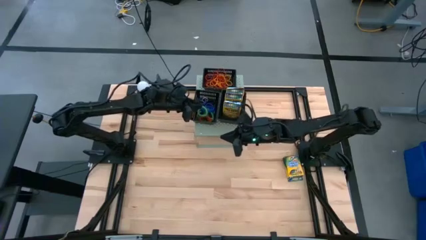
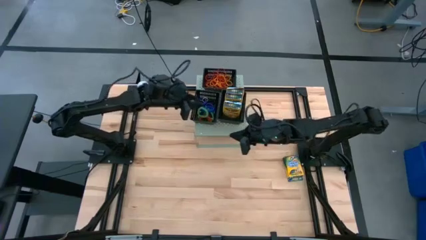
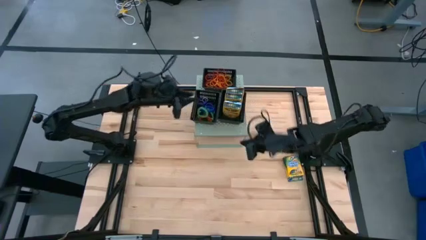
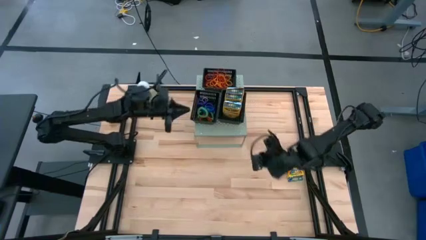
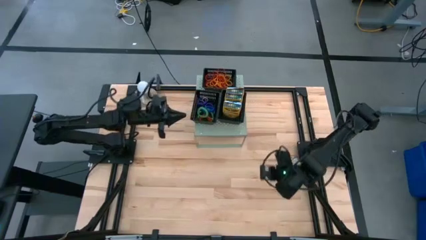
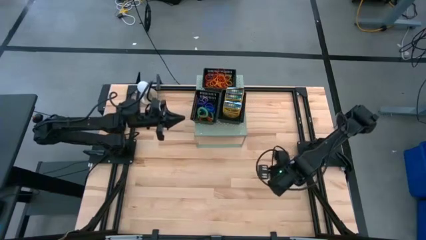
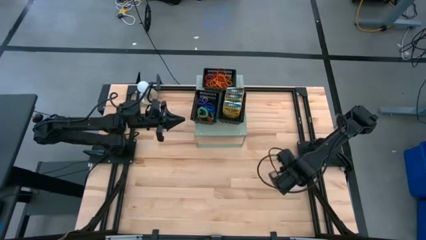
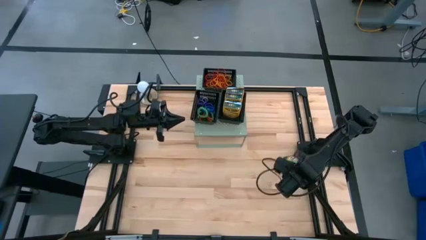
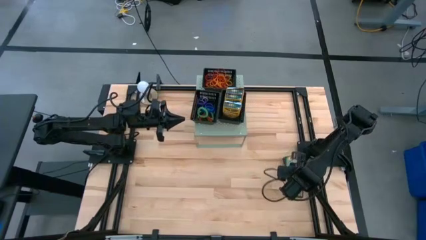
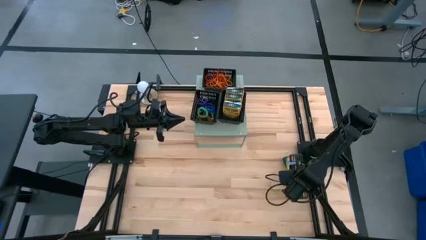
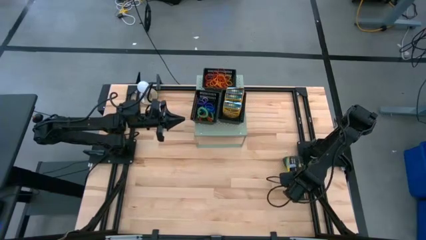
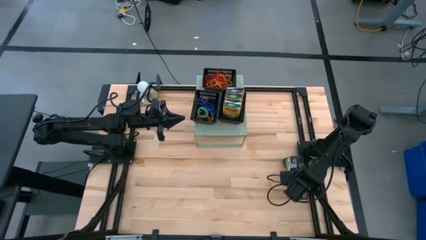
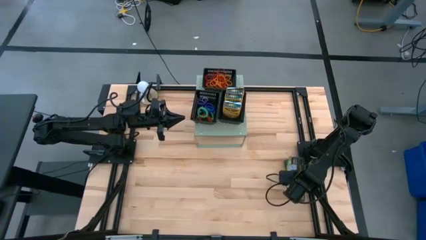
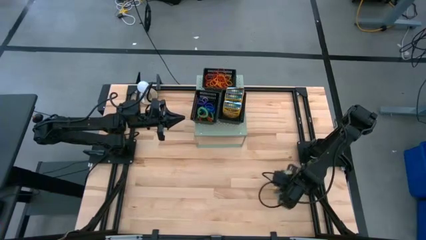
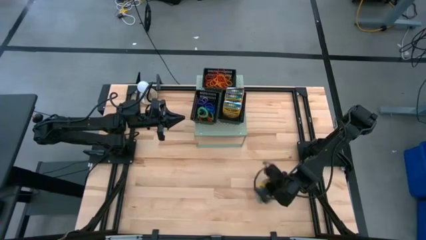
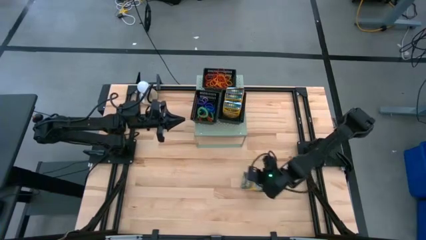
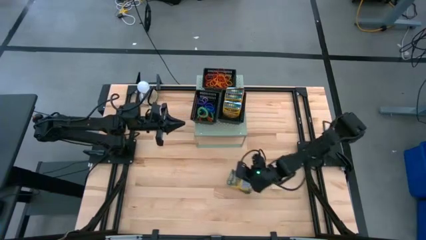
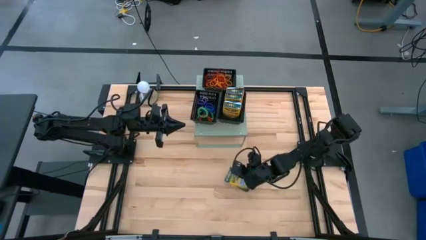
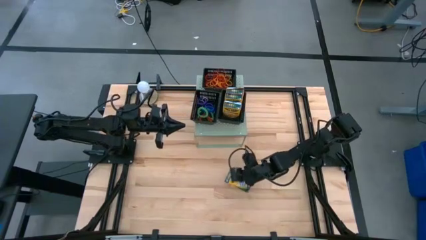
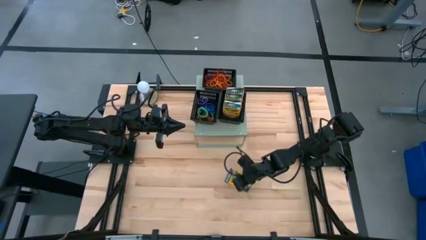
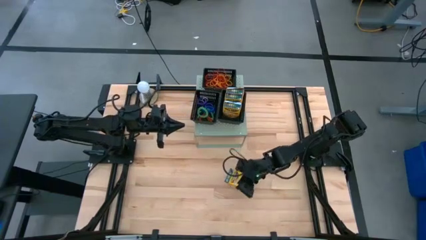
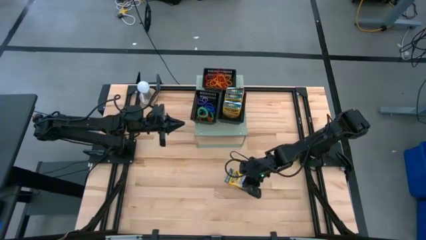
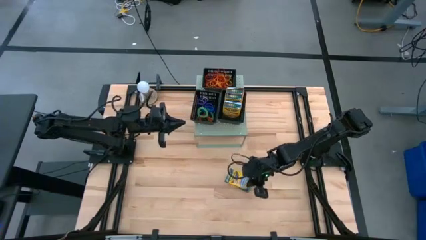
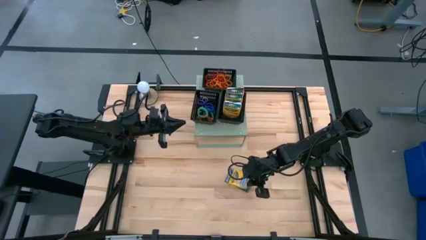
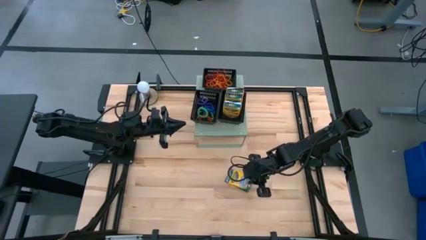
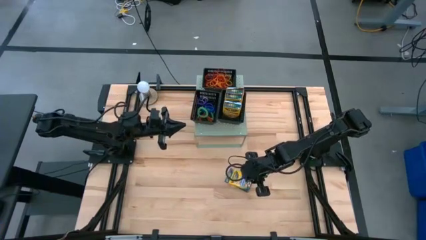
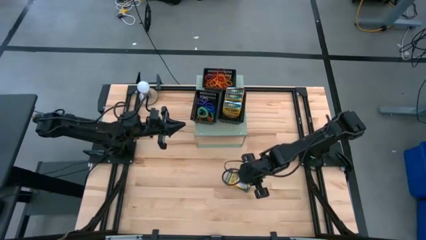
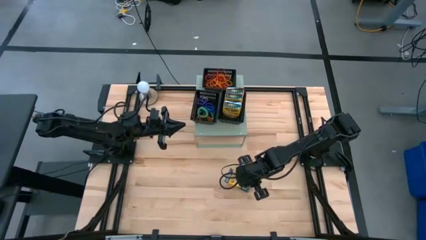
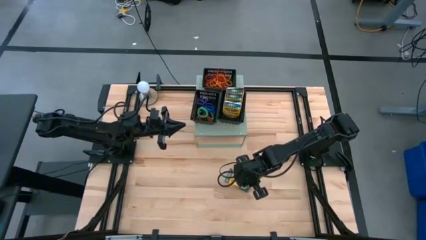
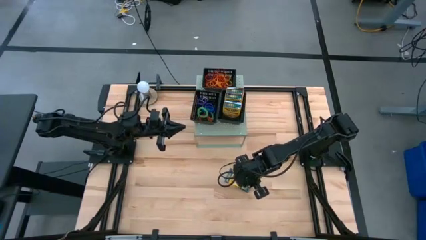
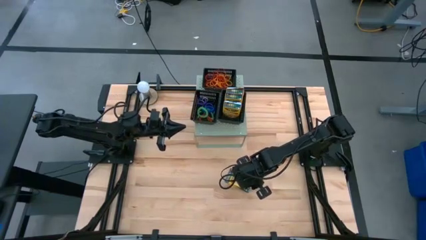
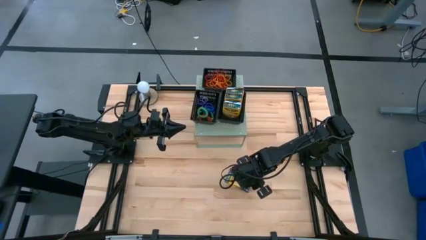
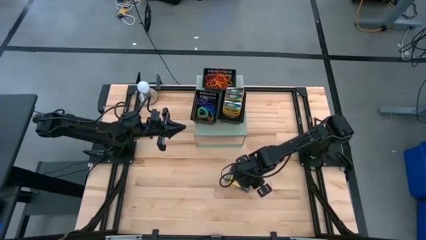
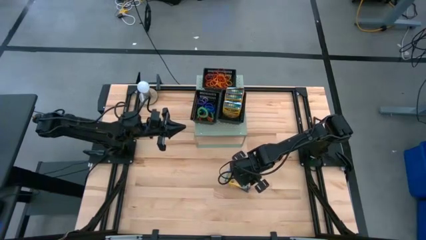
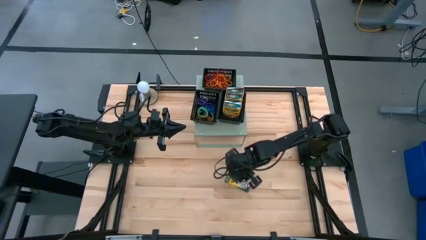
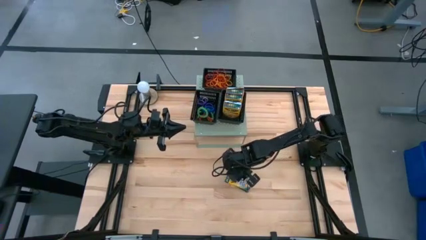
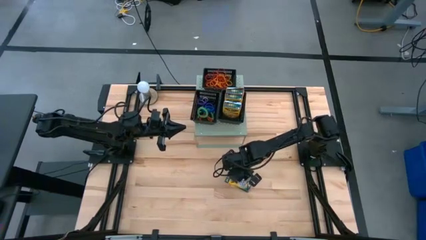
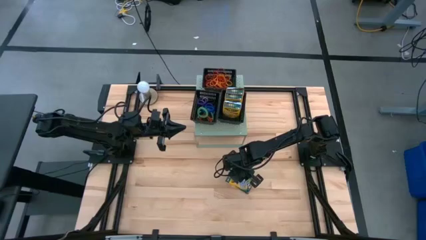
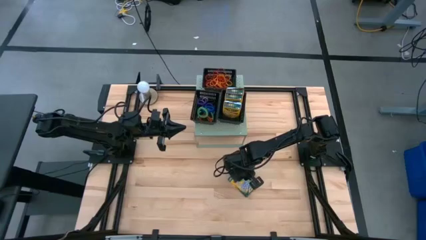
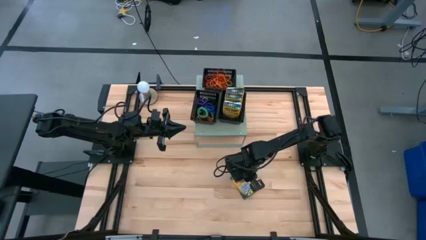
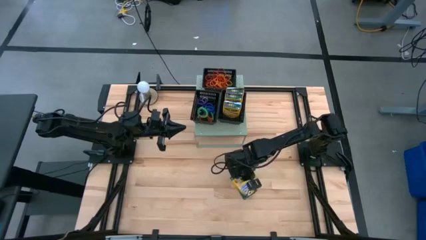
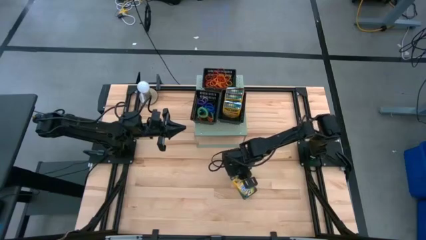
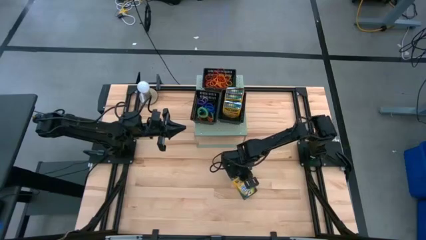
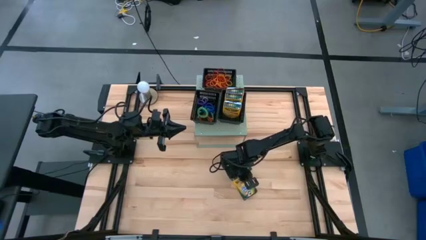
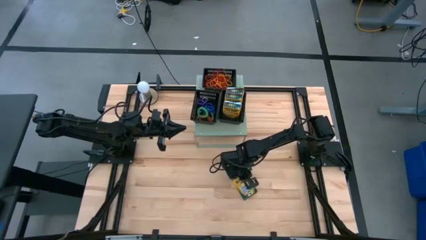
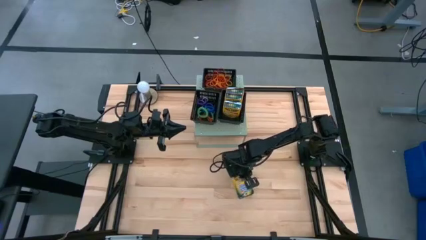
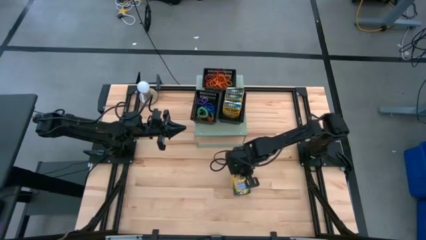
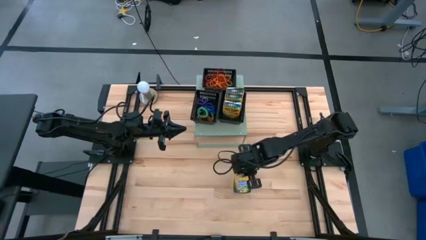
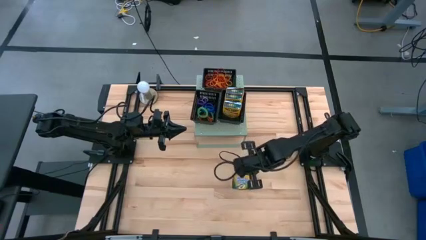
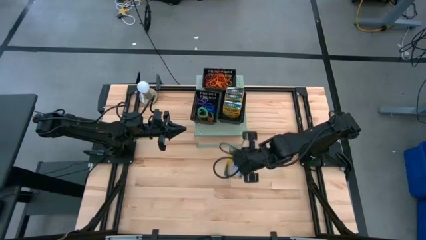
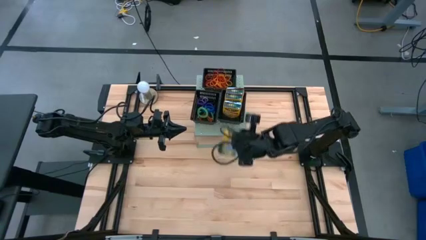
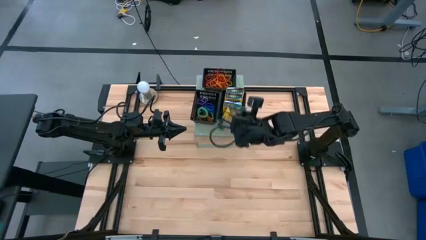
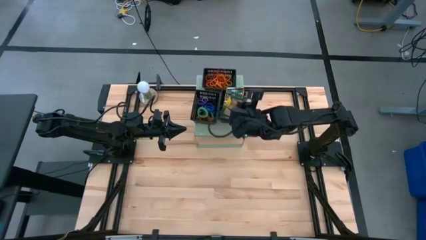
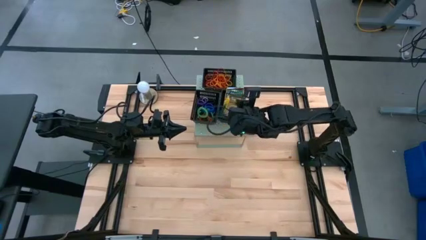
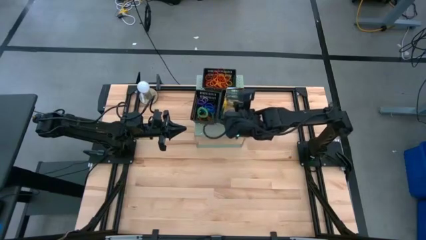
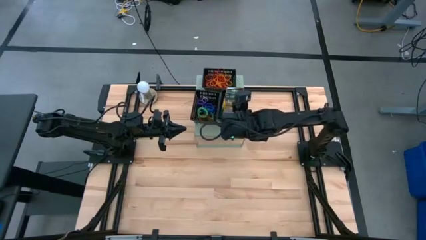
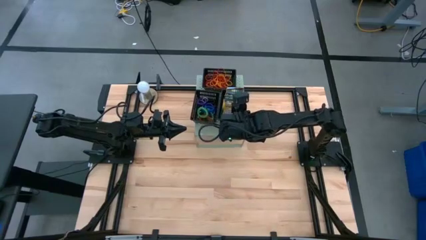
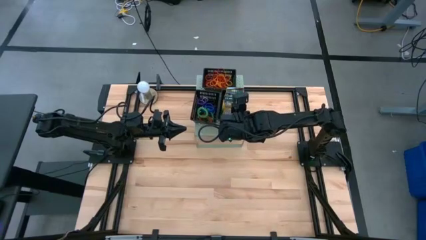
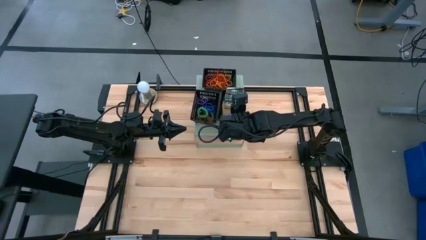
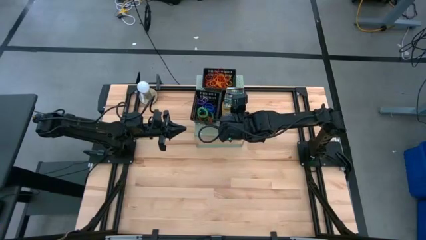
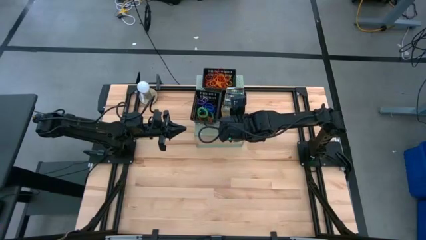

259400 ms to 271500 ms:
Task: Pick & Place Office Desk Supplies
Put the yellow crayon box into the bottom left black bin

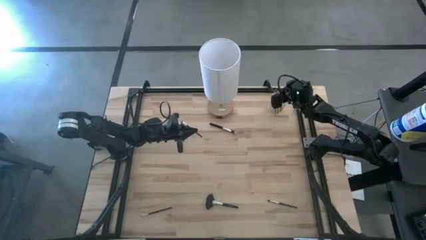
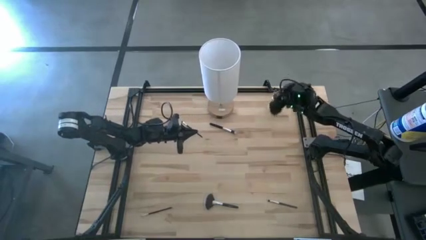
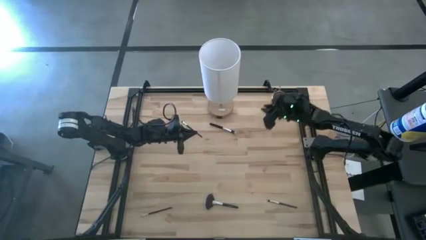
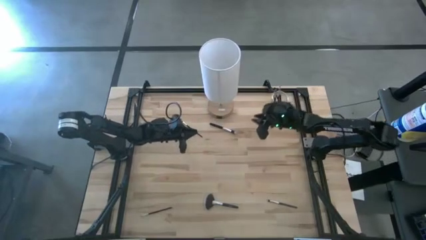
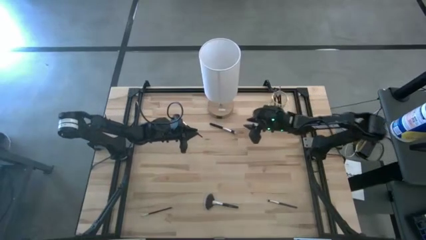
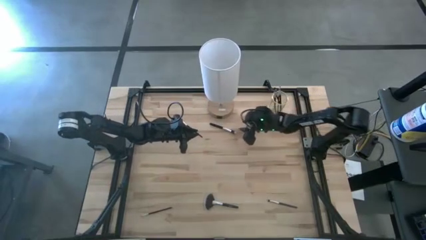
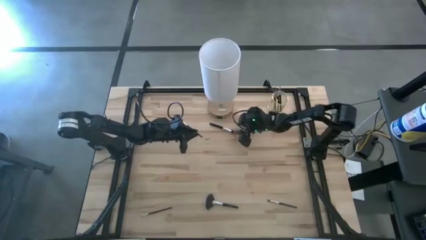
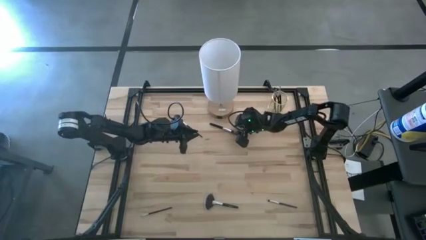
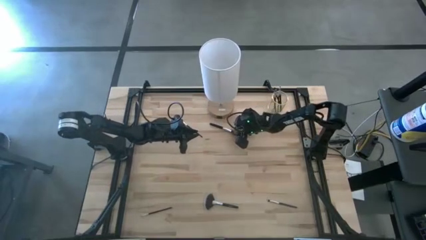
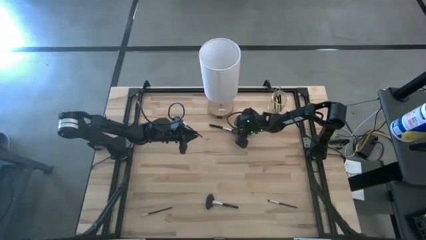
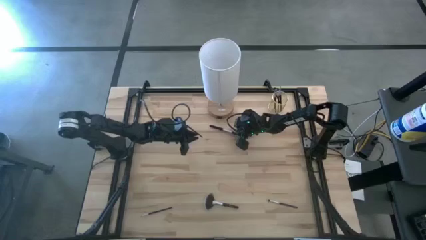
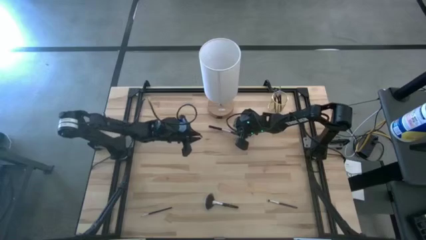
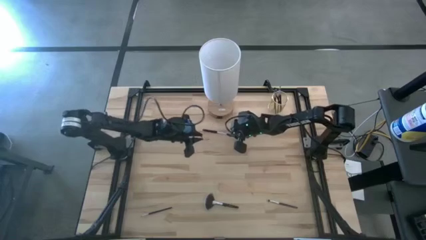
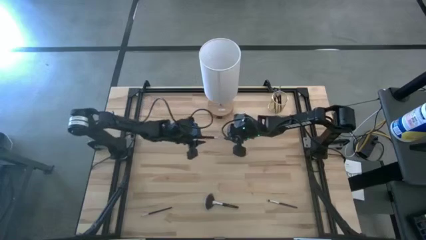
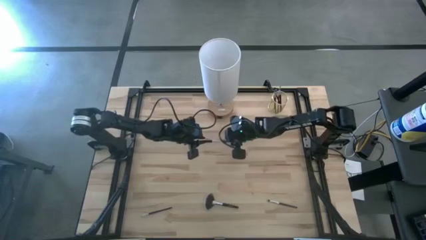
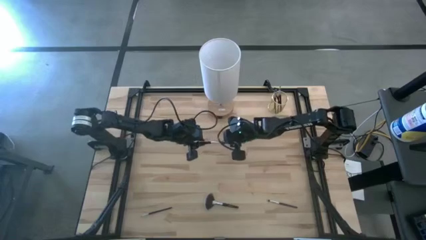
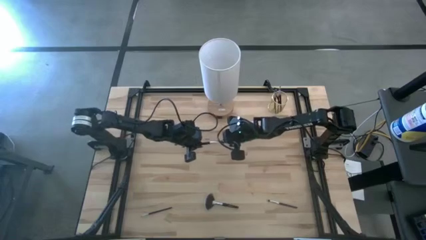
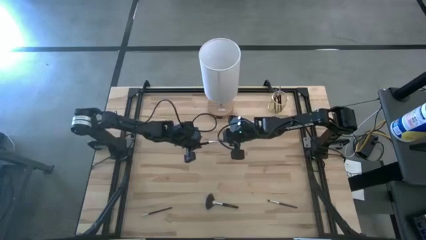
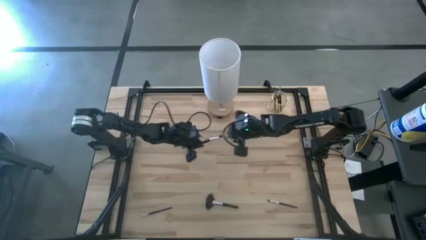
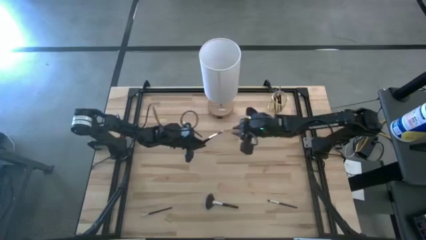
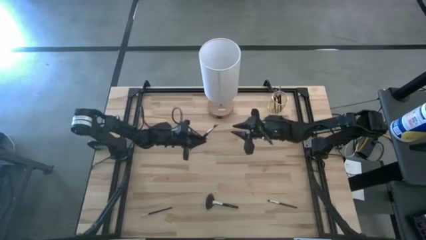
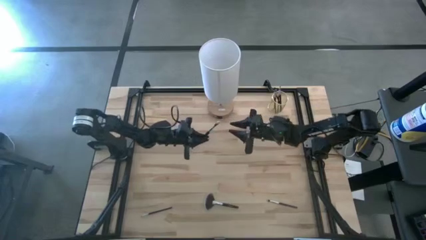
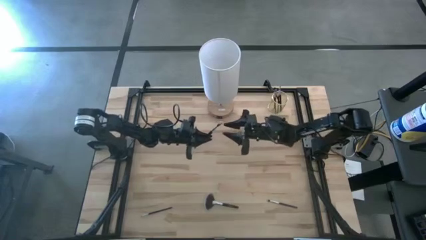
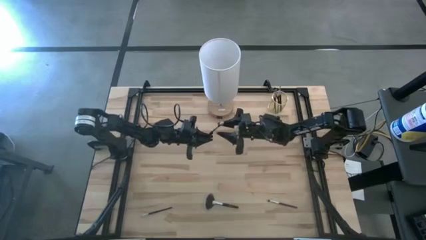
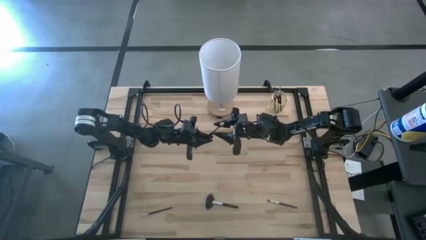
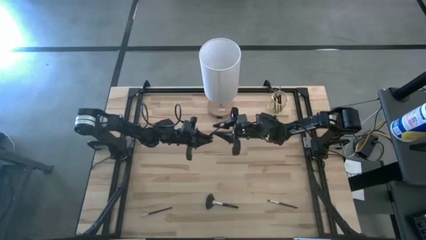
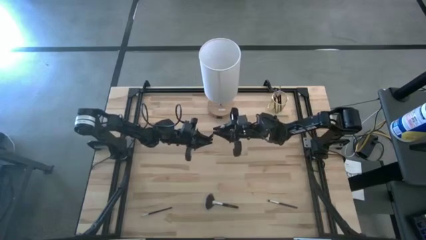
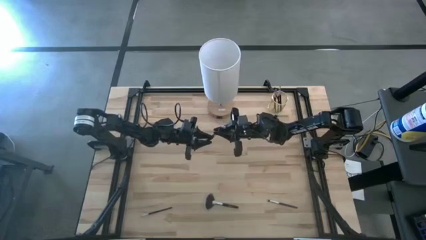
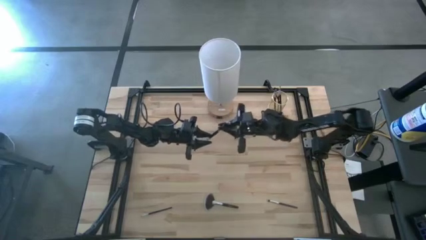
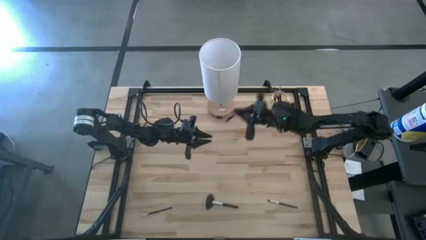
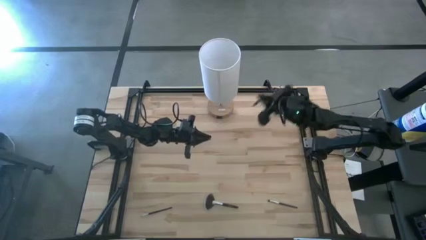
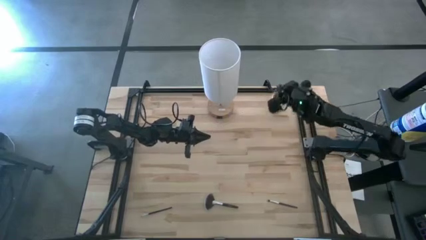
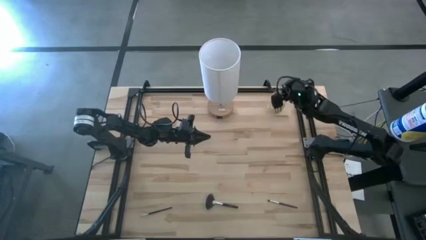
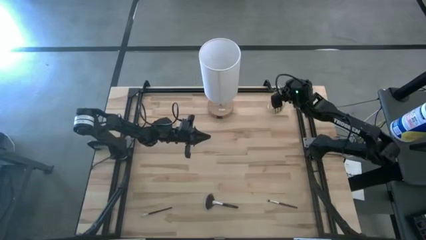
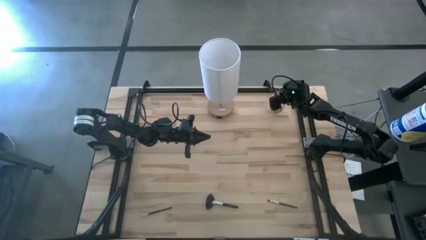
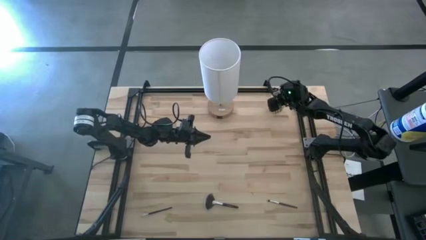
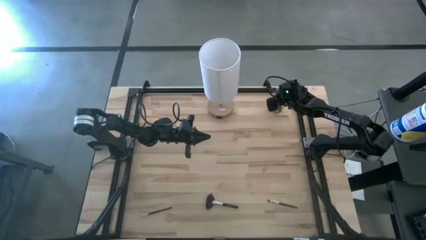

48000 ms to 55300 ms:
Task: Pick & Place Makeup Brushes
Put the foundation brush into the makeup brush holder
